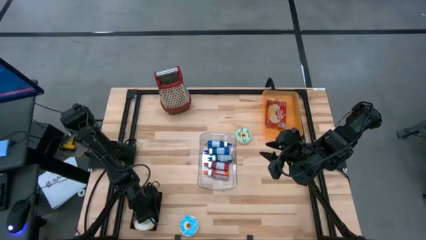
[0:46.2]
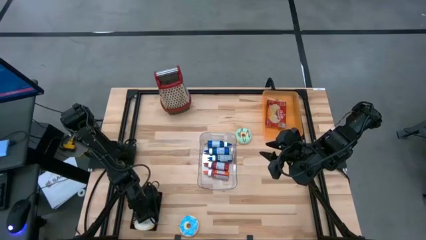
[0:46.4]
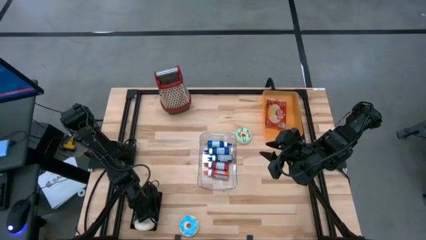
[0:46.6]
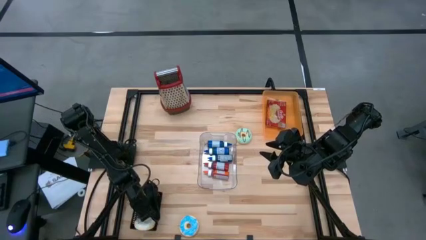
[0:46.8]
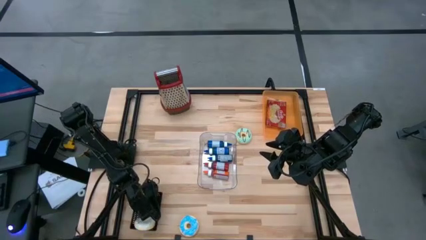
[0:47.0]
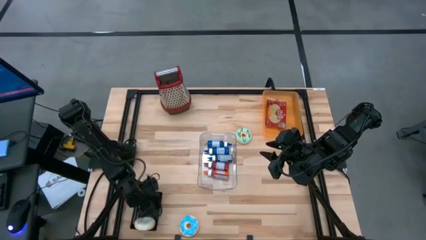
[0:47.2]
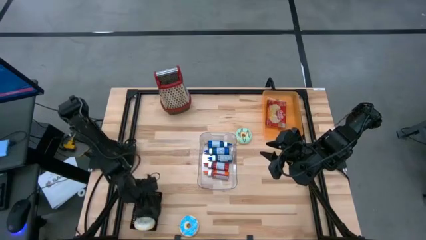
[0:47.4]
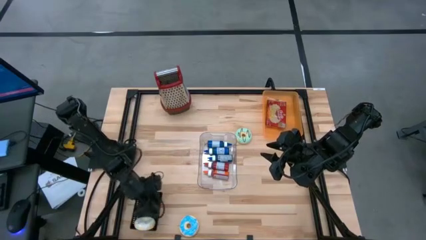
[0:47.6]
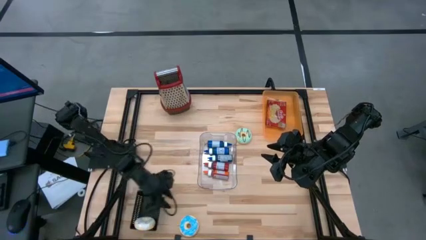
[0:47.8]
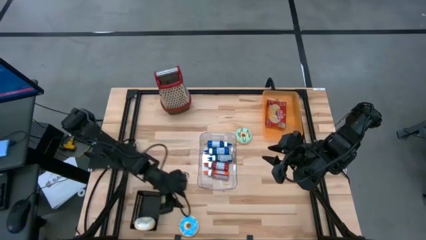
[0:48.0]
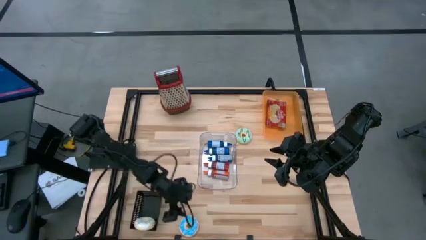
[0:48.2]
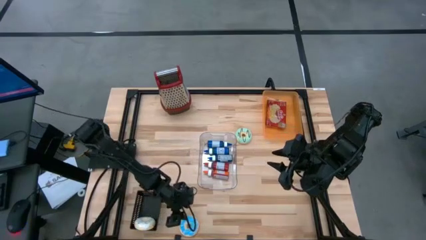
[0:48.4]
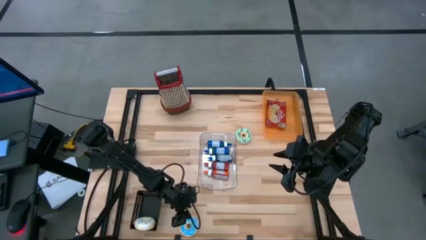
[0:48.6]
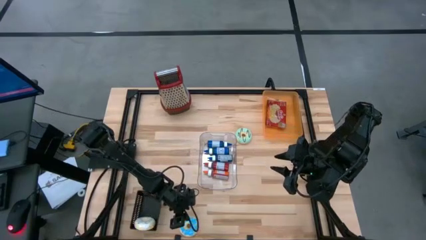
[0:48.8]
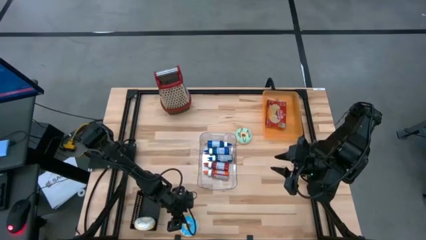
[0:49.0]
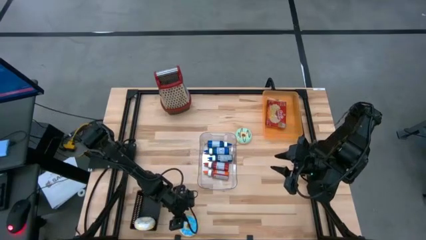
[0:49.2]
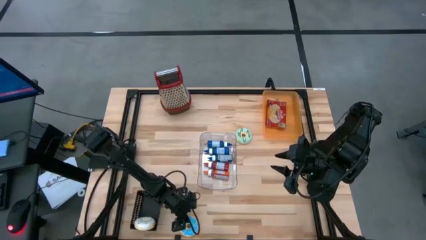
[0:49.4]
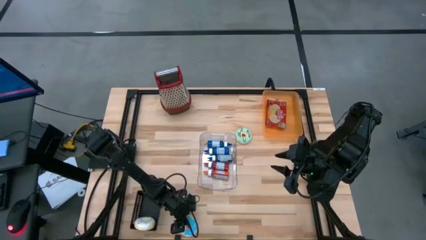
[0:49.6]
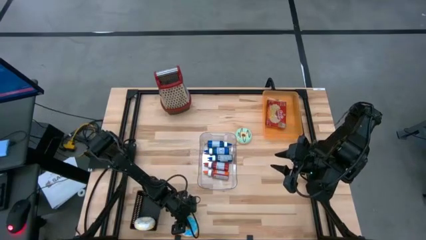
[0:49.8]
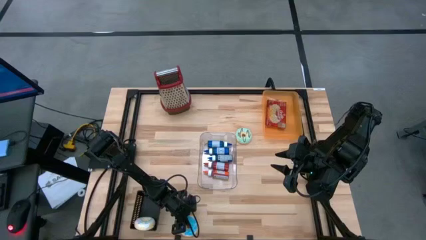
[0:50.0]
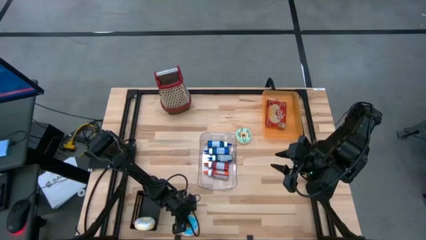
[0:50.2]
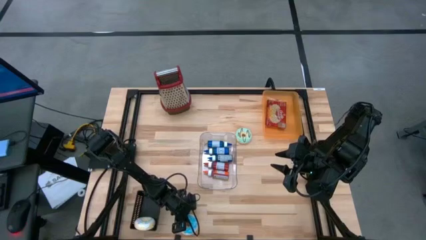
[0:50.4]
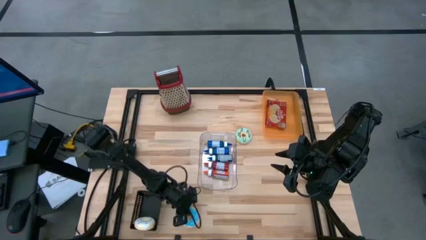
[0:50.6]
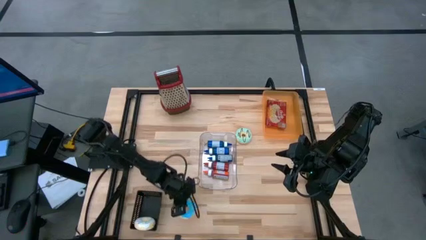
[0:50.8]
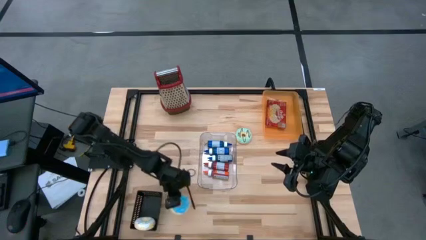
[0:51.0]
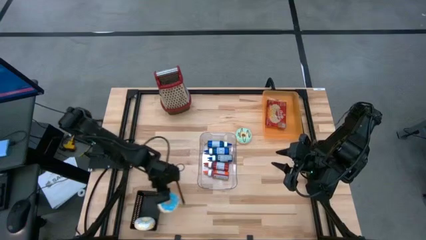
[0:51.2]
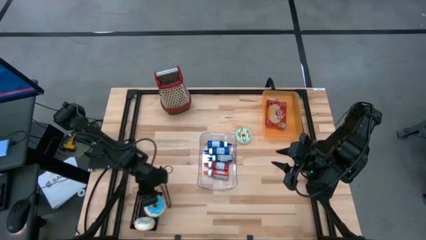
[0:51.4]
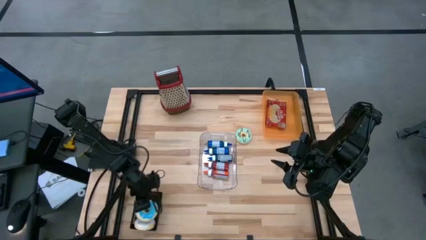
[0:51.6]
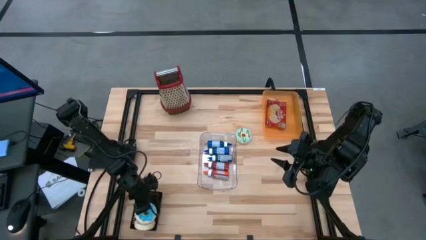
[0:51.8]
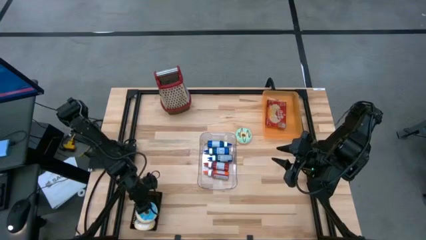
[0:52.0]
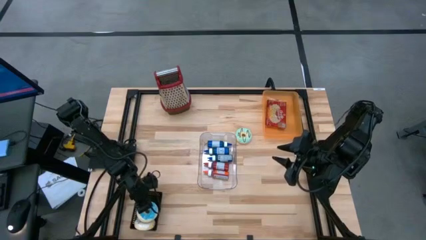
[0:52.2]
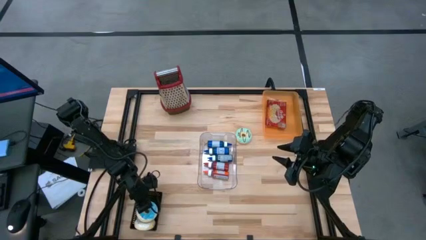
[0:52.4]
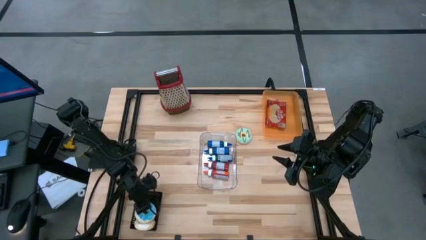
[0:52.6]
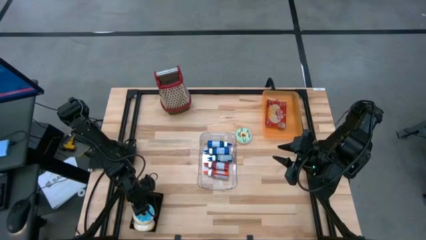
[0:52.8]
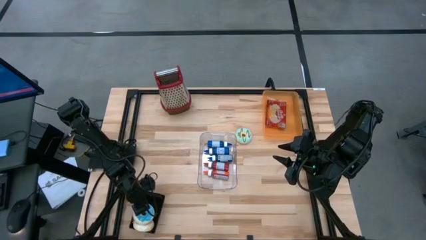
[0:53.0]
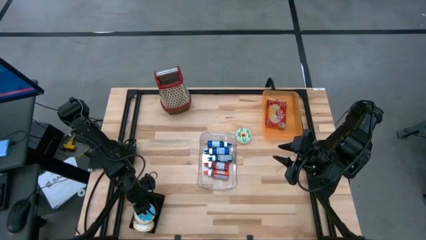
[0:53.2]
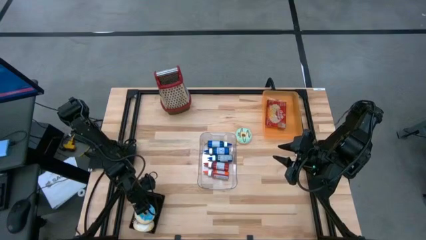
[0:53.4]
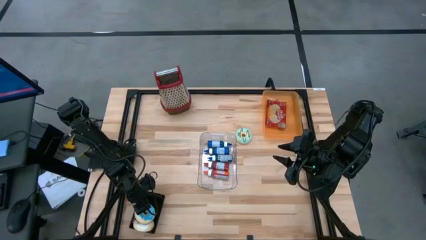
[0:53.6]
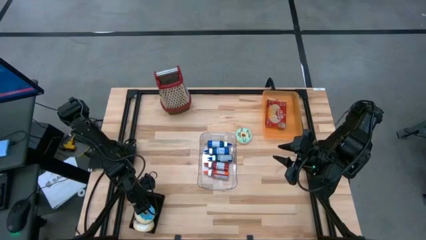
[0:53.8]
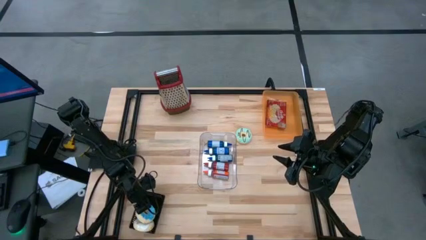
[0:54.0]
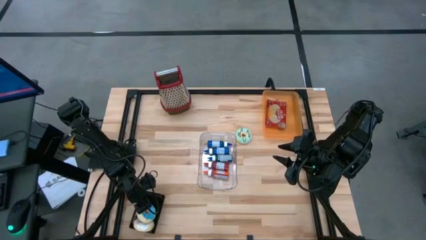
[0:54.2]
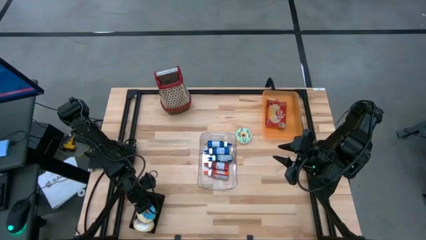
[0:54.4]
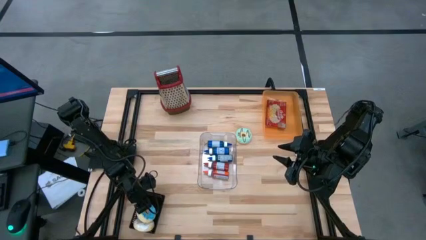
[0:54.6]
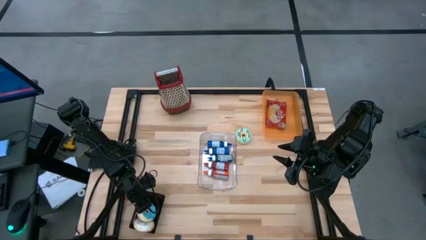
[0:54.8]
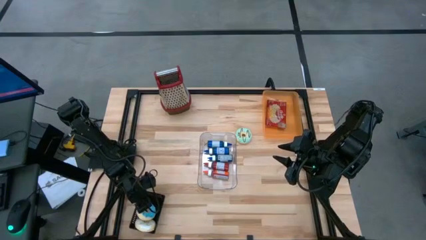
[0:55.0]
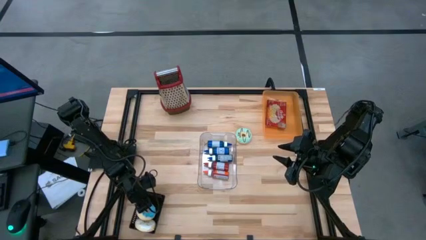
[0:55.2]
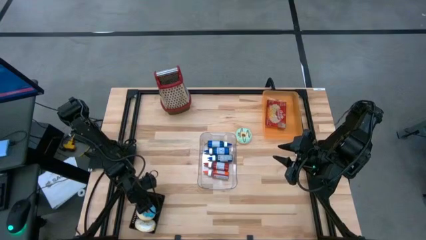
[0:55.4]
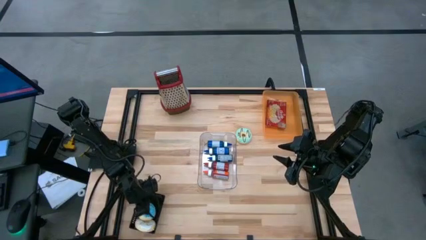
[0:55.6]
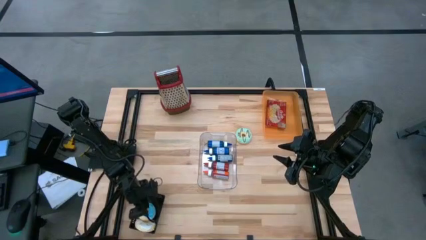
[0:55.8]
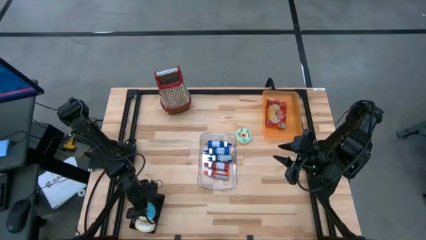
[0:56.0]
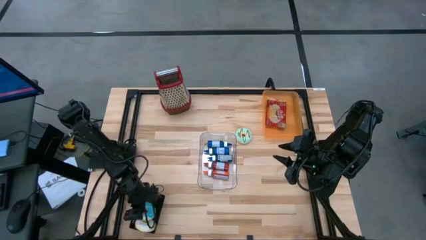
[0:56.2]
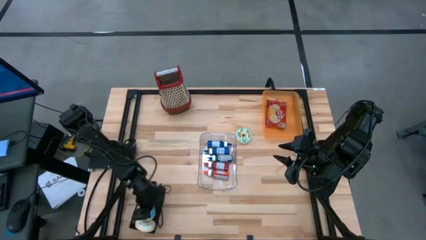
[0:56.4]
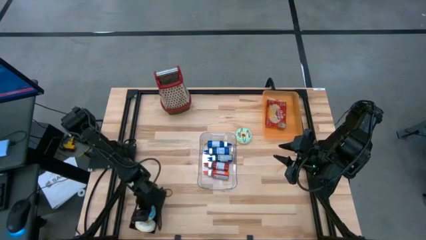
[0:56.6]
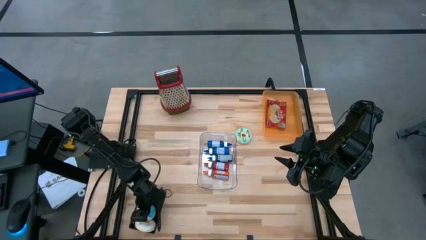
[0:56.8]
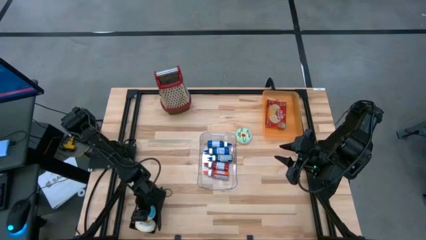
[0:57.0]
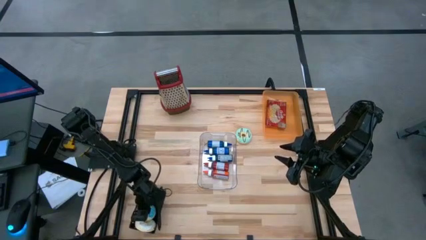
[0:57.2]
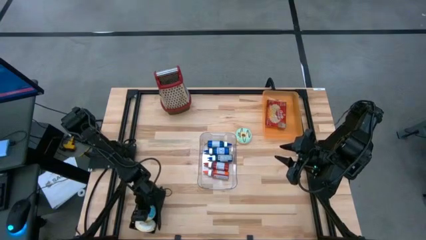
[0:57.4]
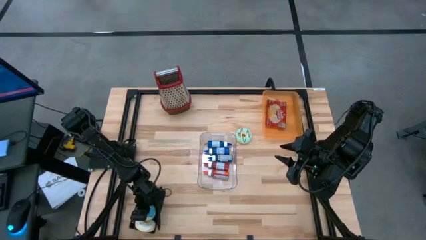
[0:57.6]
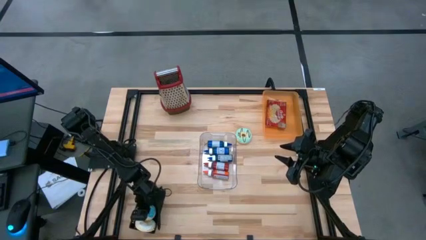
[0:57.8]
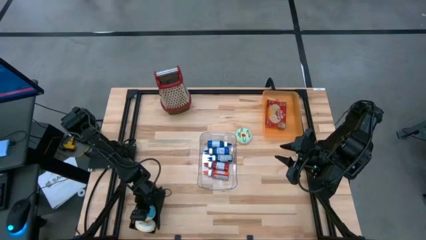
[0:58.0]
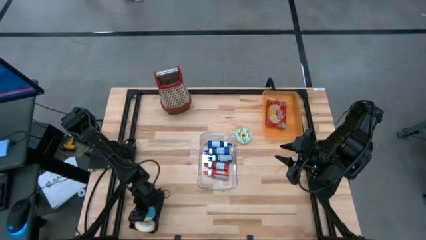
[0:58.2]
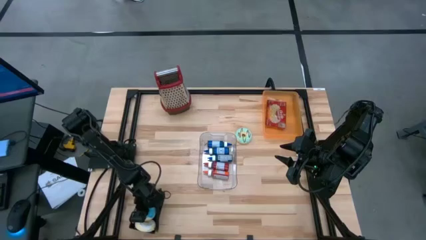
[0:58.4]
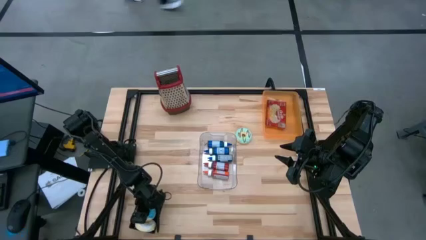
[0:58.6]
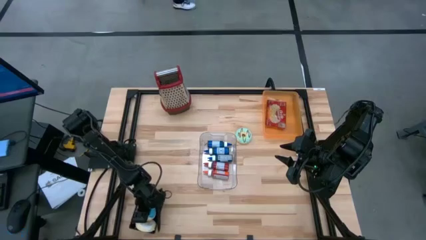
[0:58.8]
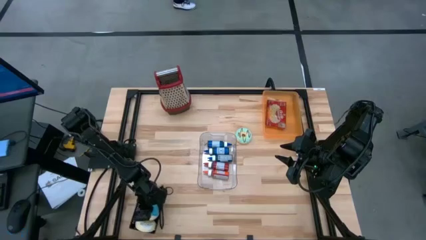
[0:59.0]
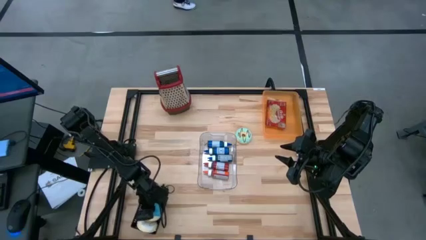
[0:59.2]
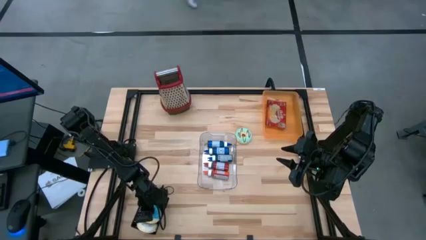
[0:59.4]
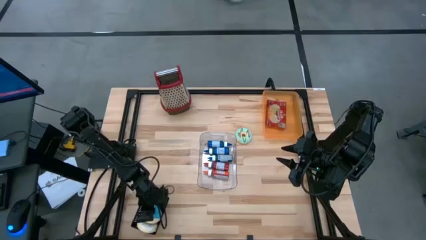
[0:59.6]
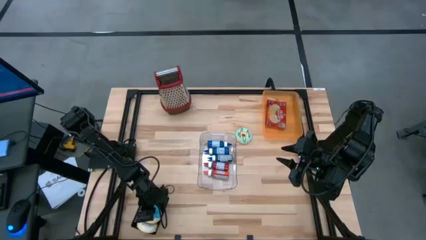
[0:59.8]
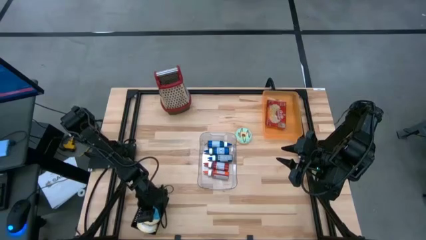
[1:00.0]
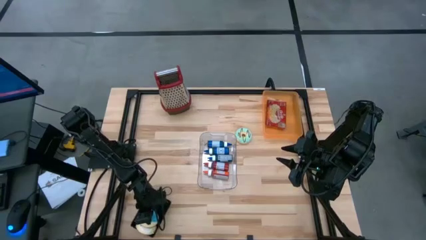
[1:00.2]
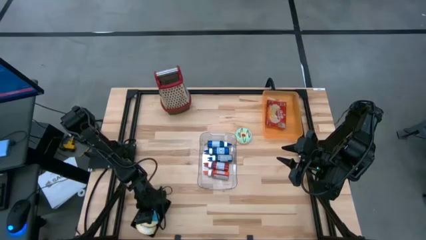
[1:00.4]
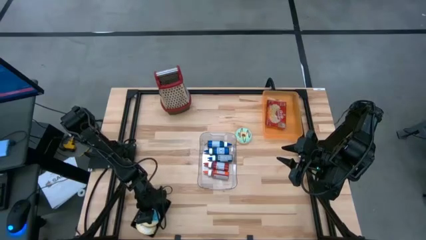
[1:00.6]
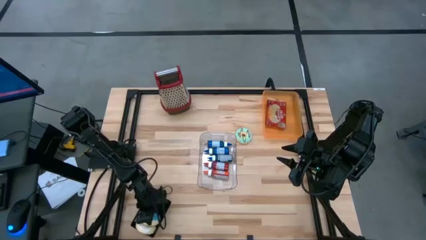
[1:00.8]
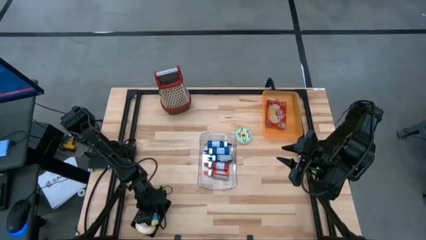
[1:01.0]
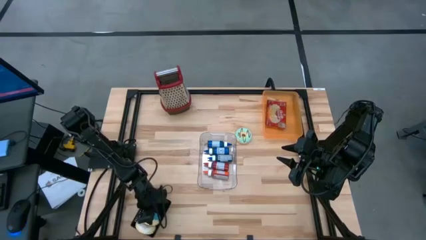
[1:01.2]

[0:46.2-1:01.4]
Put the blue donut into the black bin
